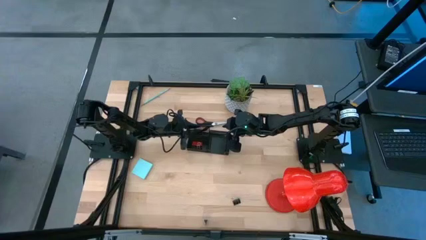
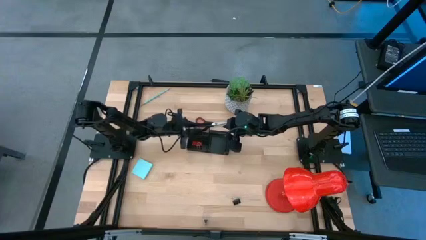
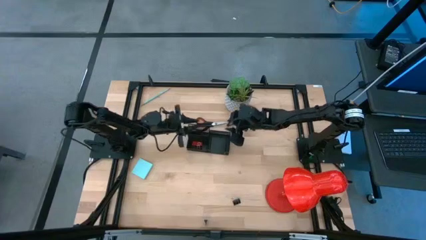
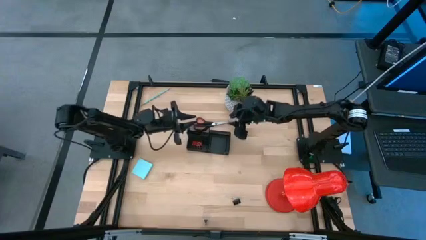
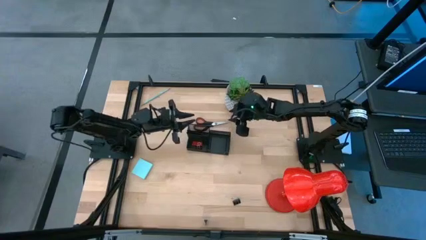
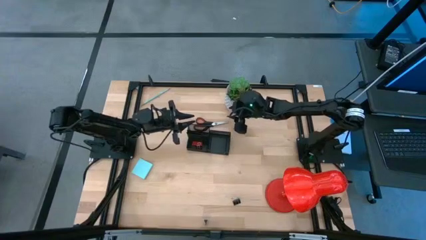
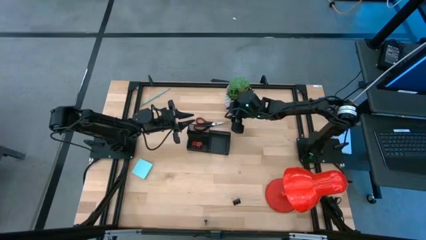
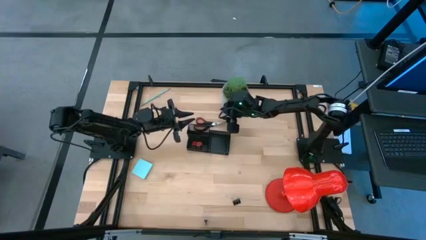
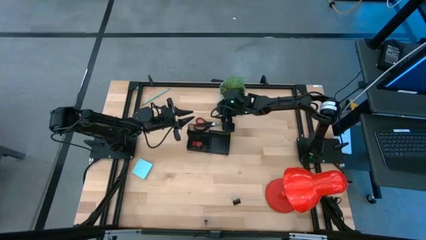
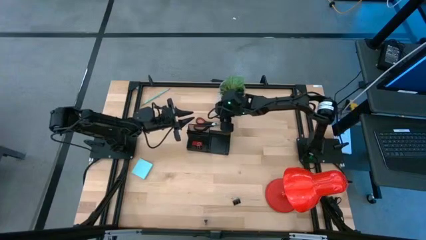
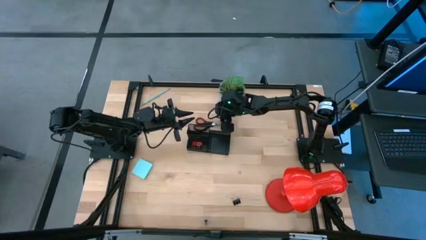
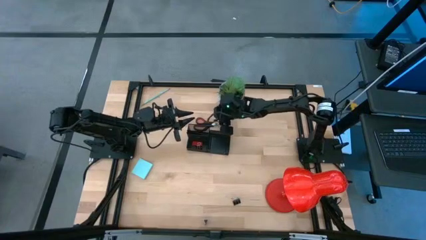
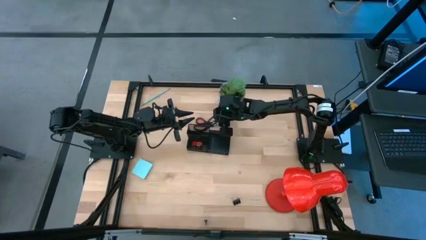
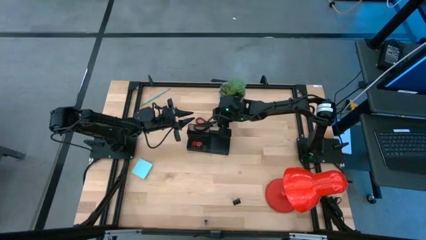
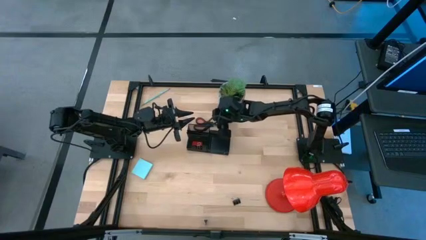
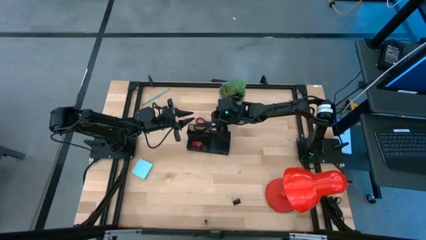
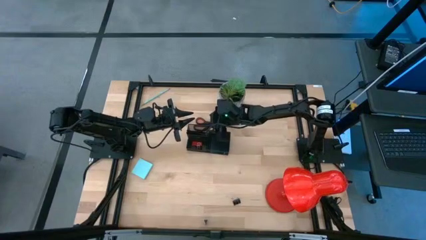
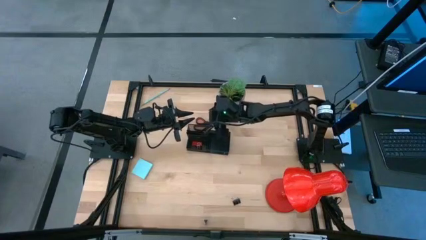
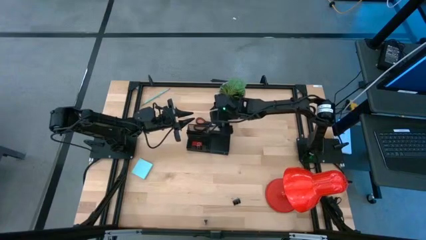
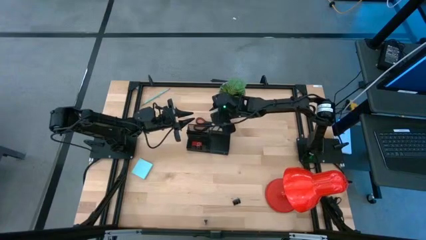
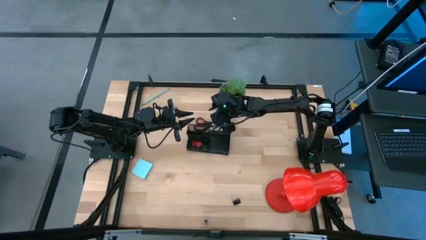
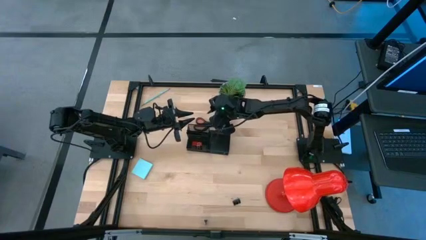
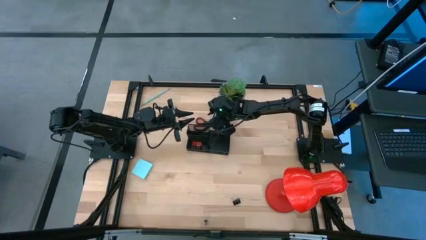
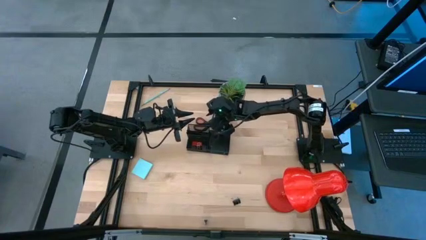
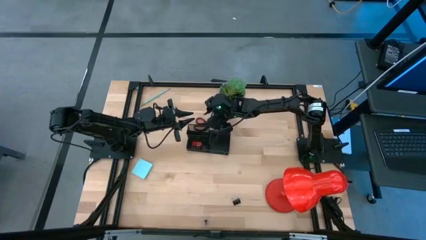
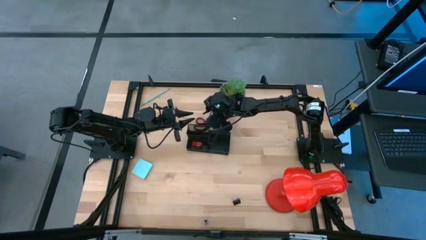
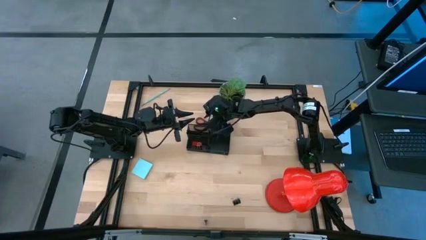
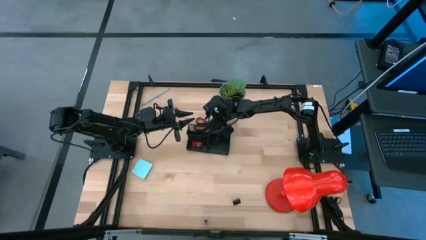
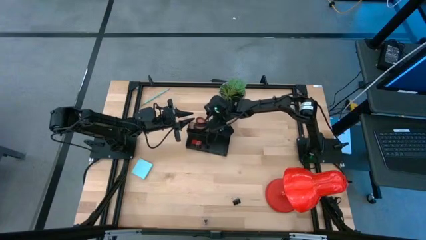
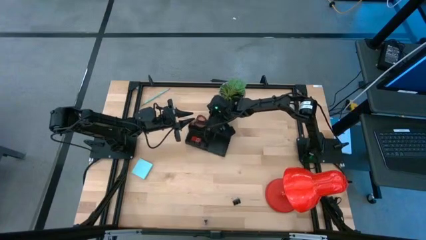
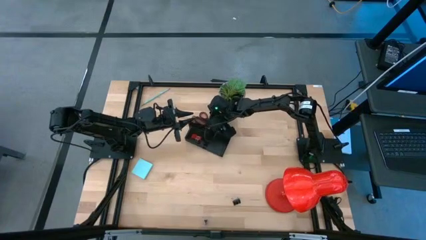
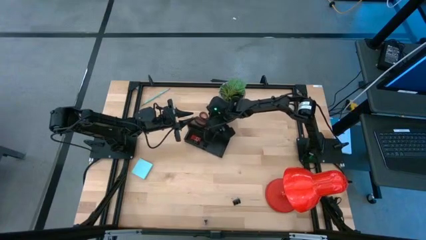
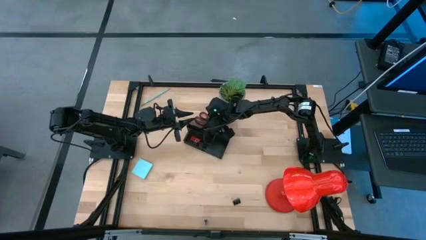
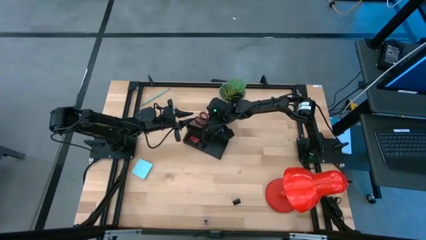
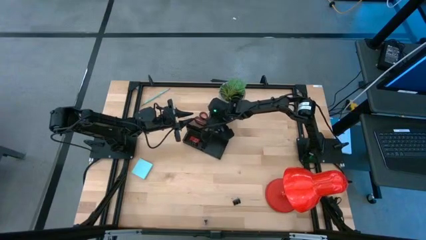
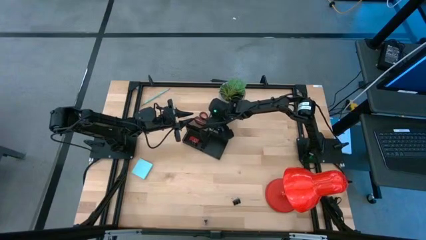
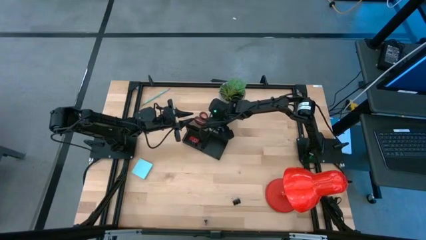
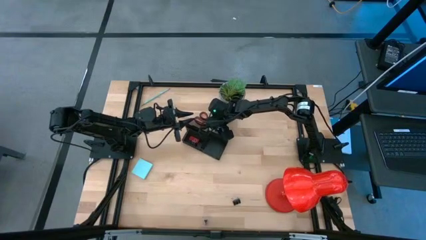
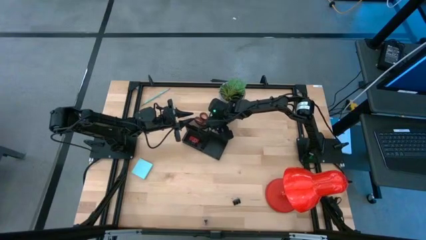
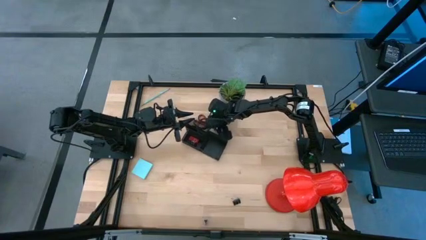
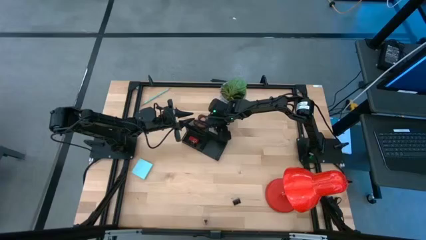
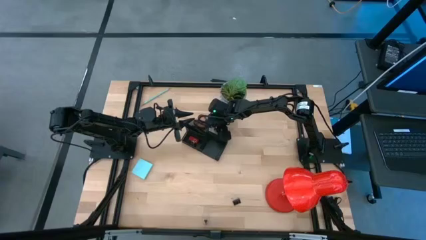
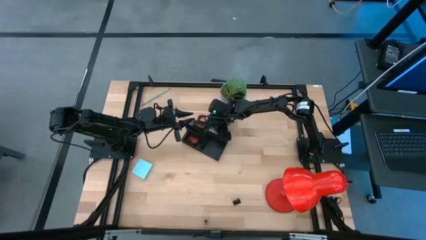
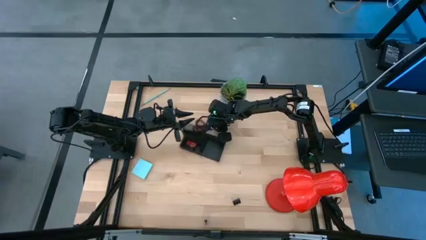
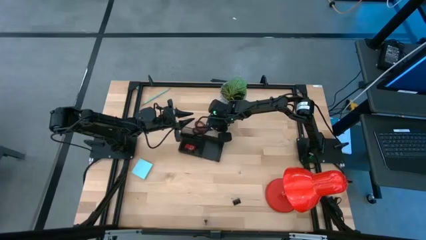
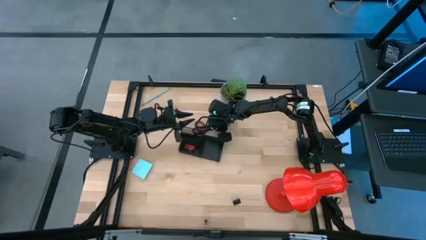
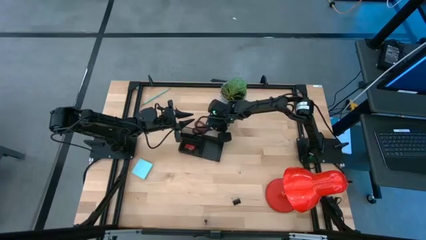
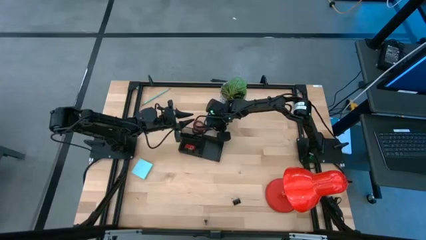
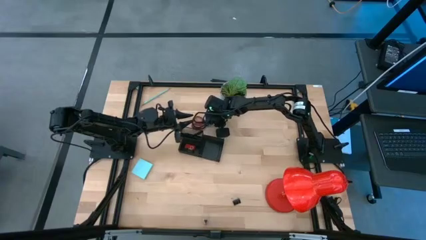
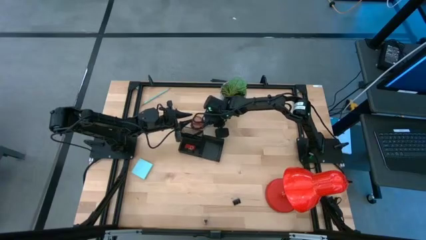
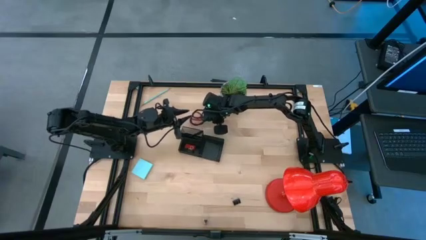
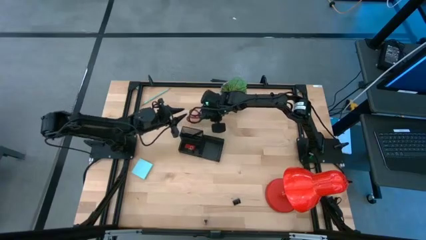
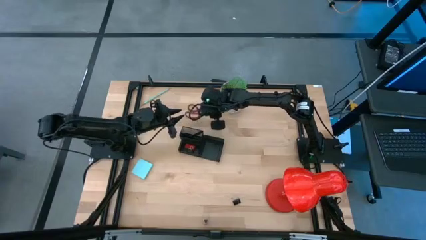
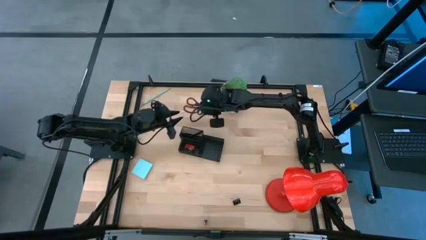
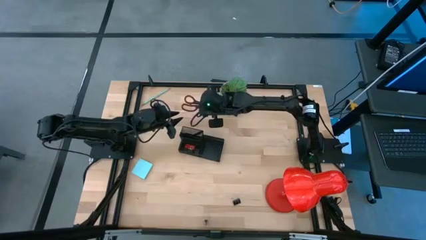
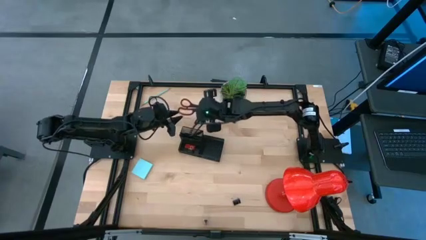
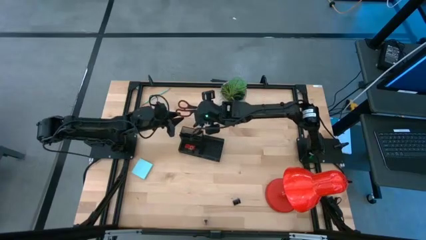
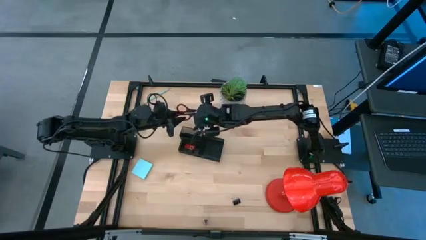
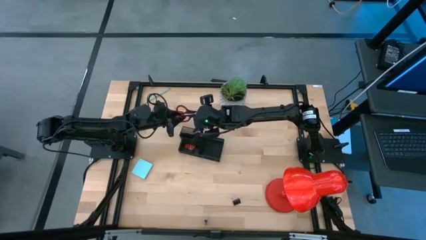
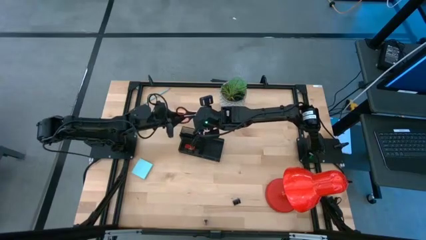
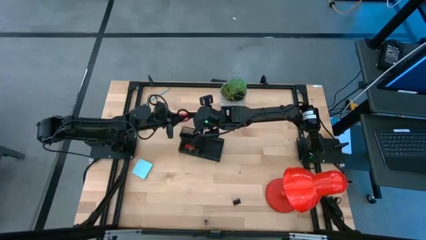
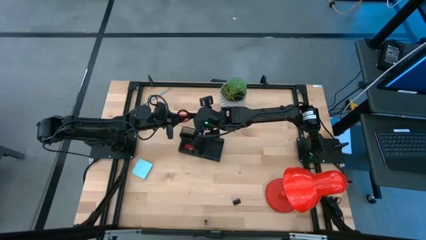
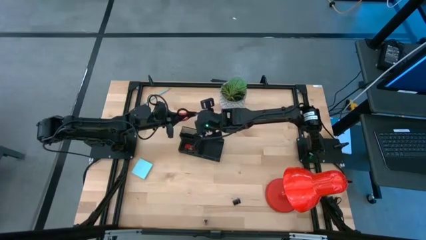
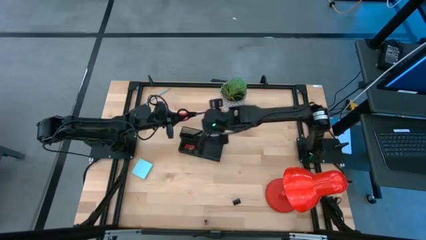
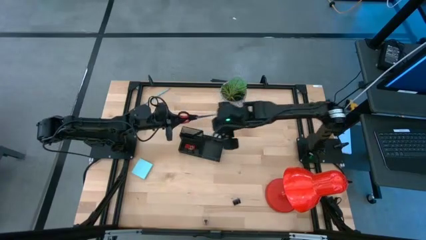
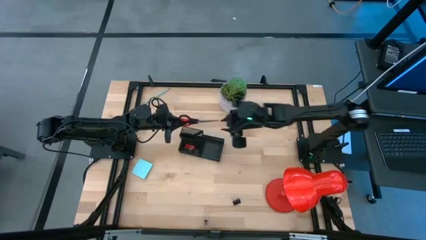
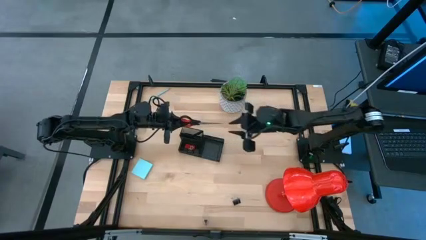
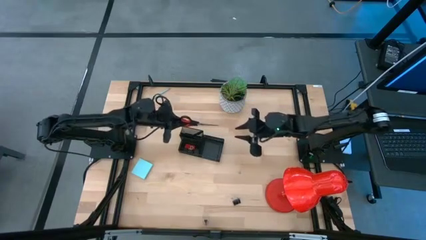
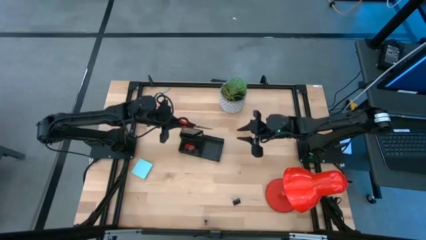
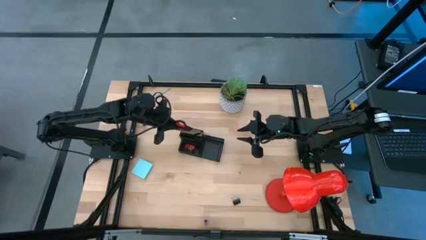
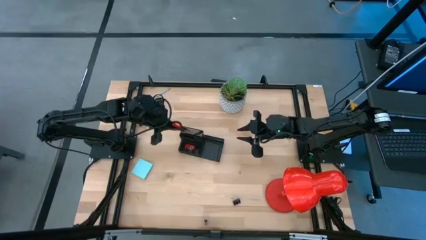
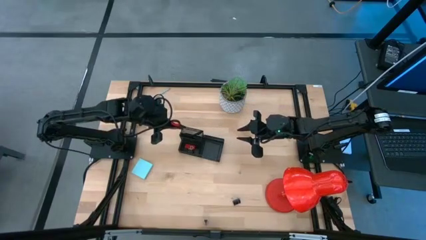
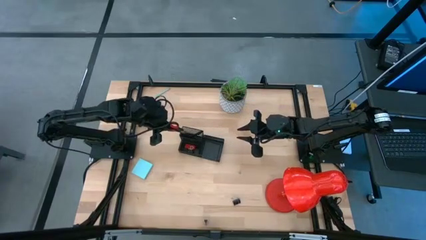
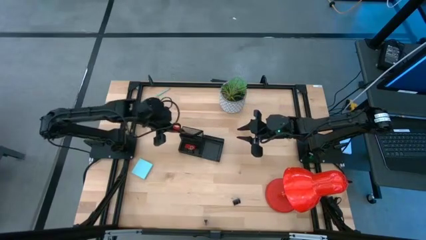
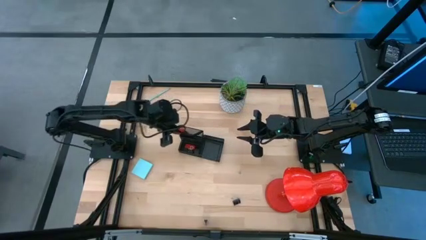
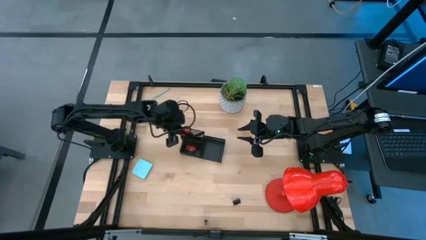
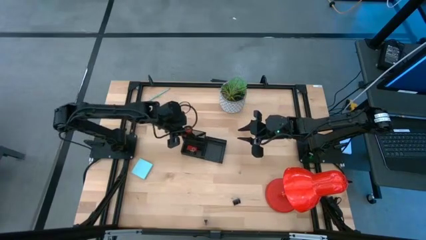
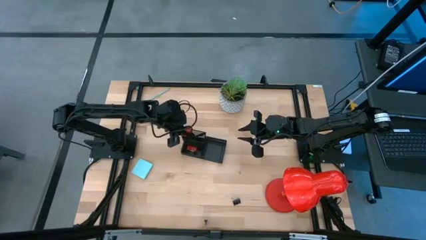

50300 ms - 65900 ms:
Task: Pick and place office supplies into organizer
Put the scissors into the top left section of the desk organizer

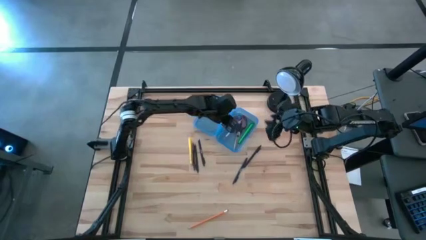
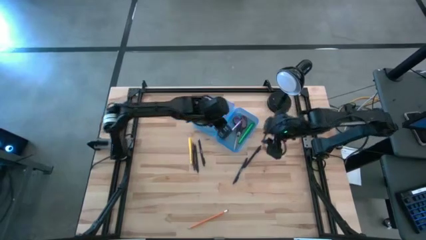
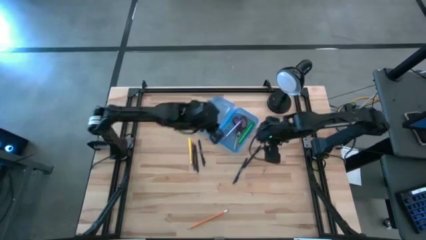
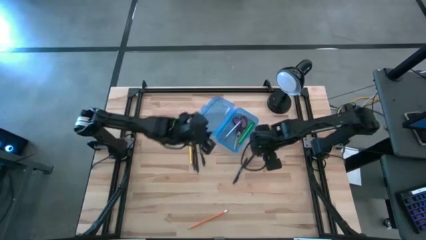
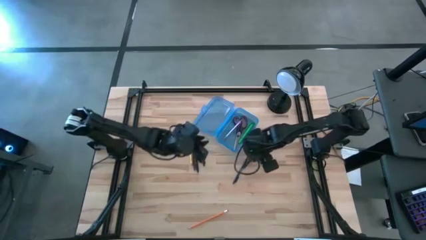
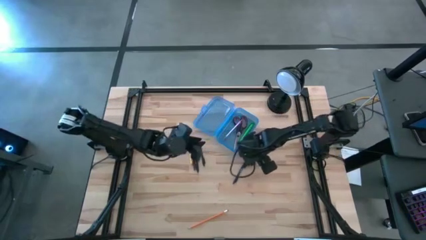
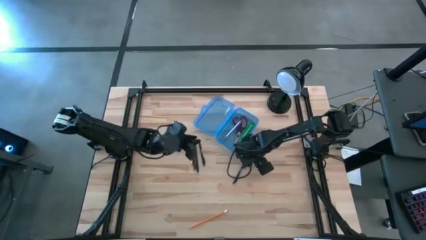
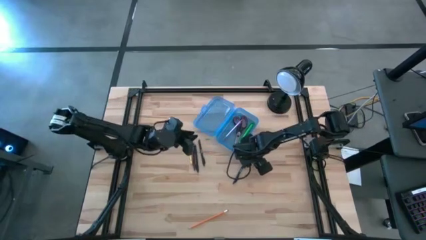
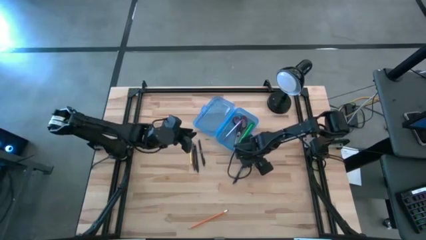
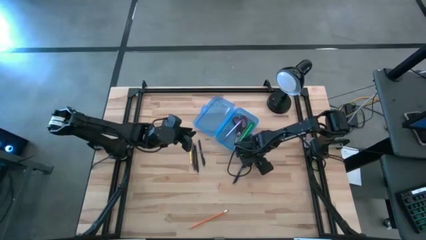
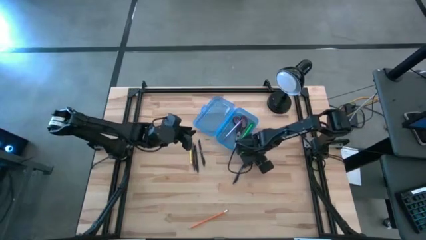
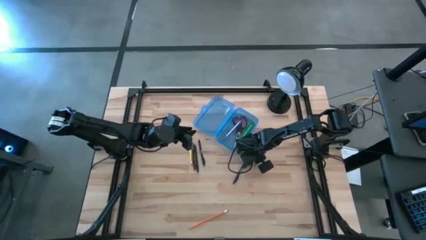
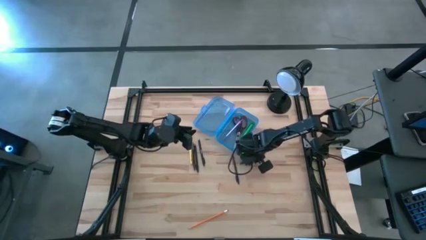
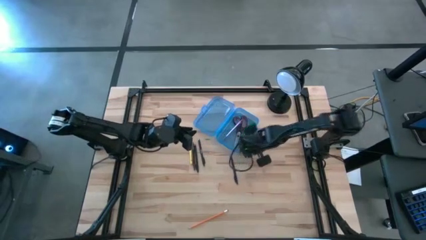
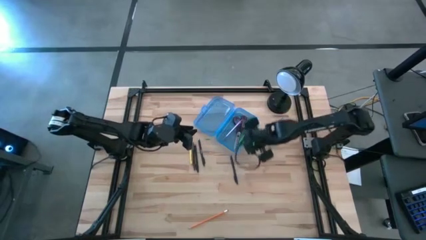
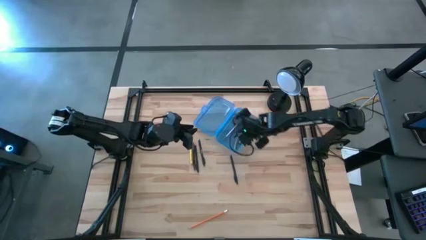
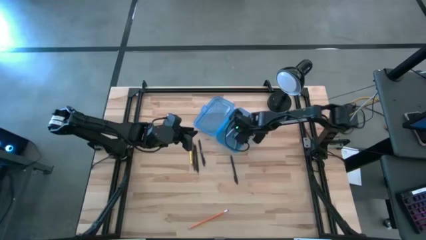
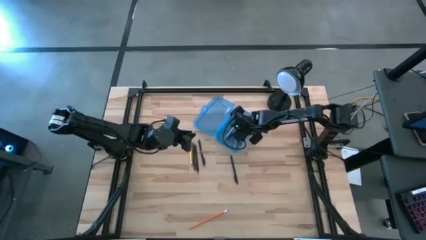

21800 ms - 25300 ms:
Task: Pick & place school supplies into a supply box
Put the black pen into the blue supply box
